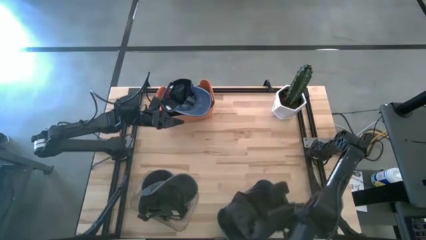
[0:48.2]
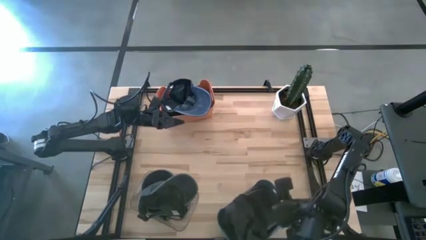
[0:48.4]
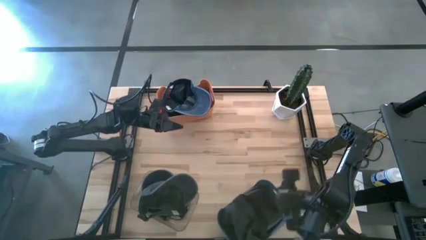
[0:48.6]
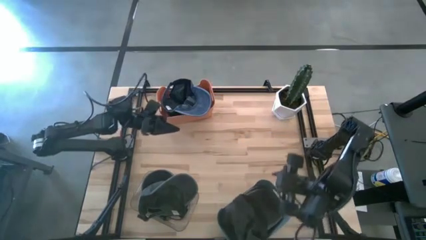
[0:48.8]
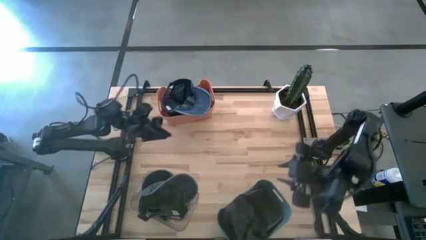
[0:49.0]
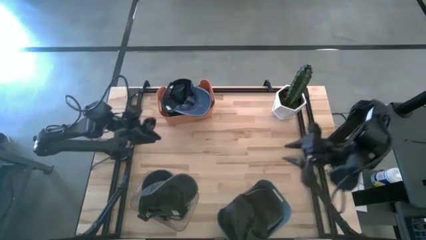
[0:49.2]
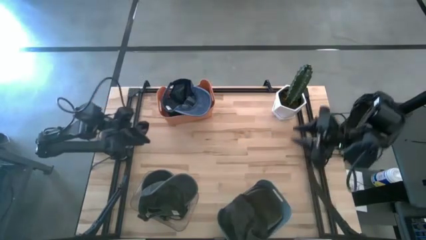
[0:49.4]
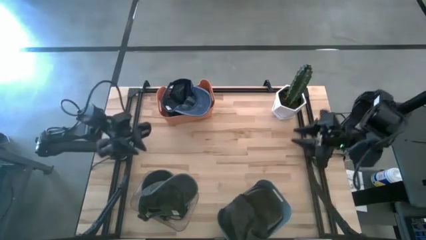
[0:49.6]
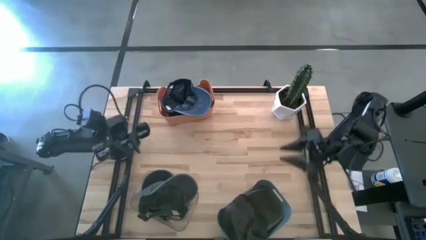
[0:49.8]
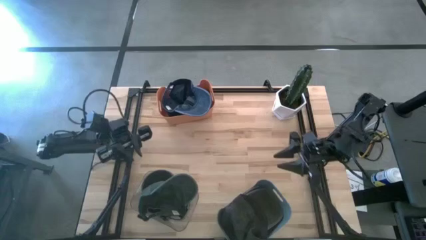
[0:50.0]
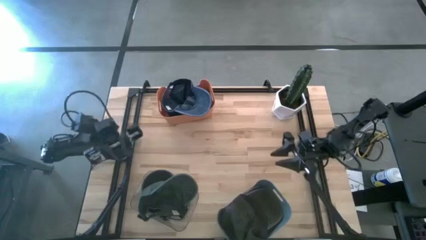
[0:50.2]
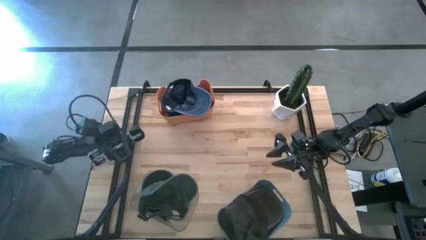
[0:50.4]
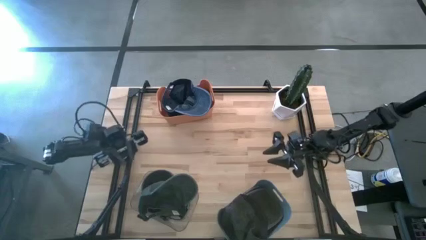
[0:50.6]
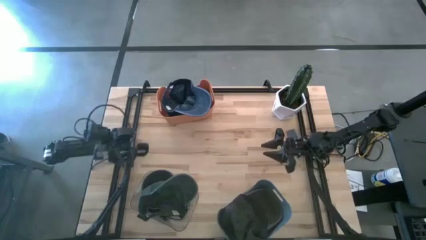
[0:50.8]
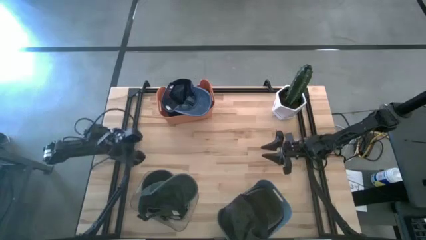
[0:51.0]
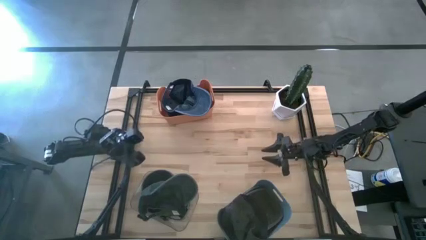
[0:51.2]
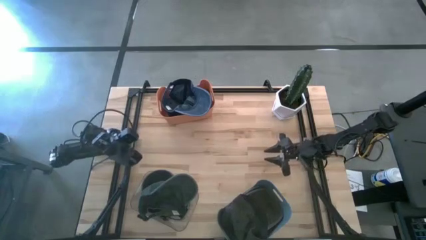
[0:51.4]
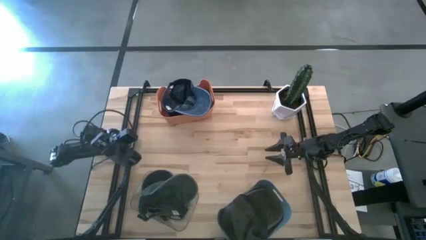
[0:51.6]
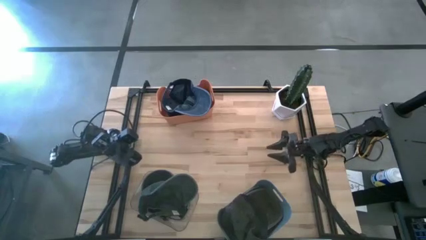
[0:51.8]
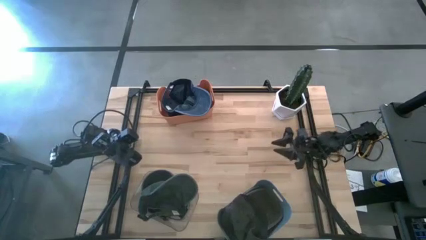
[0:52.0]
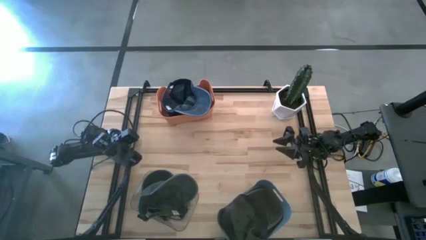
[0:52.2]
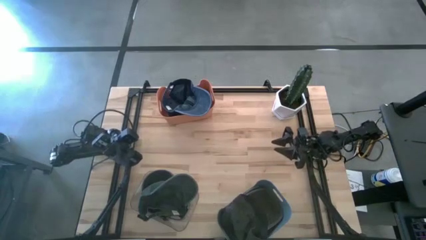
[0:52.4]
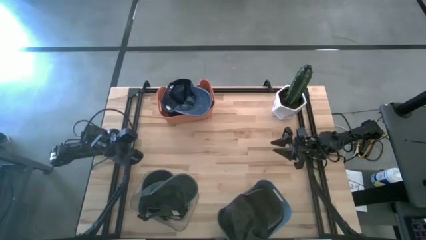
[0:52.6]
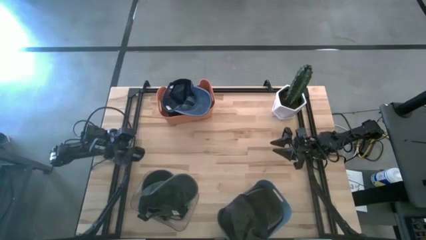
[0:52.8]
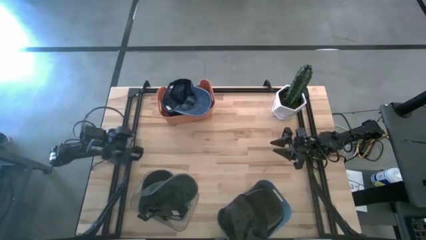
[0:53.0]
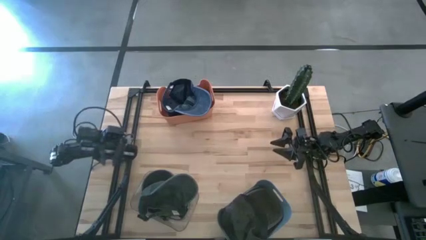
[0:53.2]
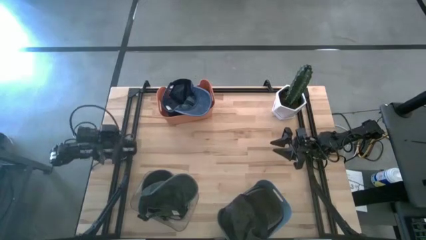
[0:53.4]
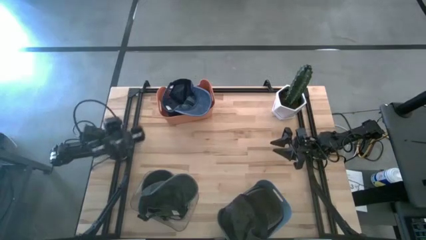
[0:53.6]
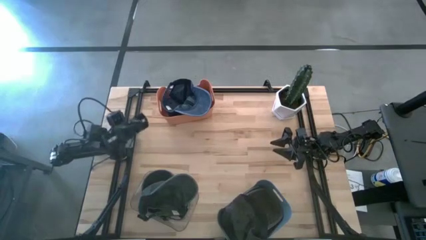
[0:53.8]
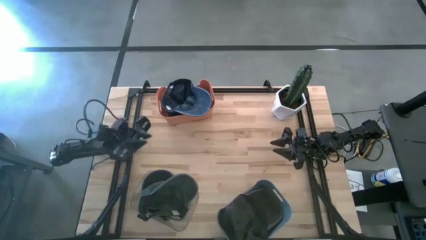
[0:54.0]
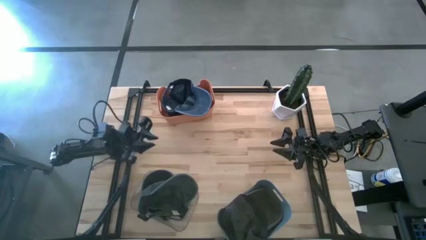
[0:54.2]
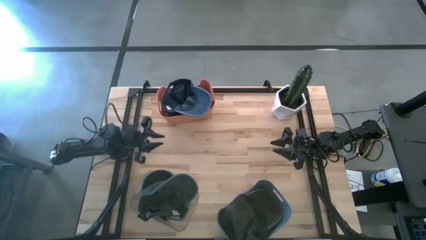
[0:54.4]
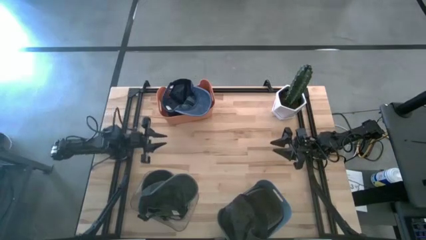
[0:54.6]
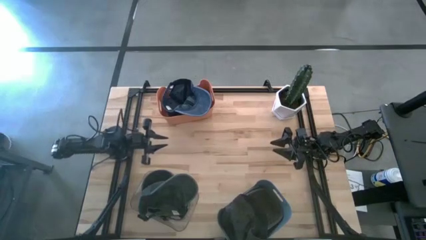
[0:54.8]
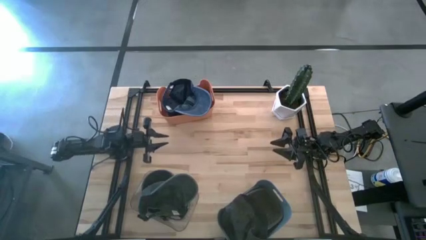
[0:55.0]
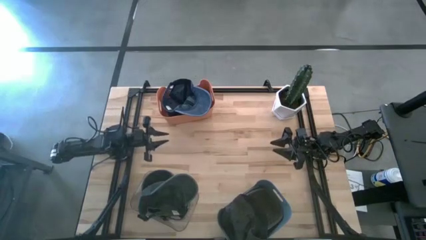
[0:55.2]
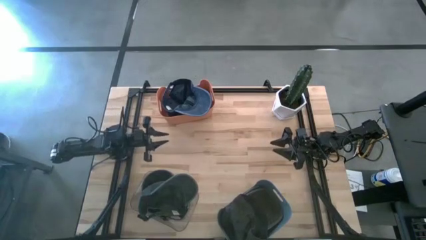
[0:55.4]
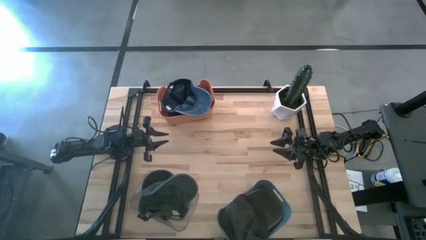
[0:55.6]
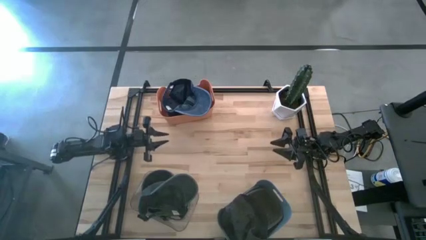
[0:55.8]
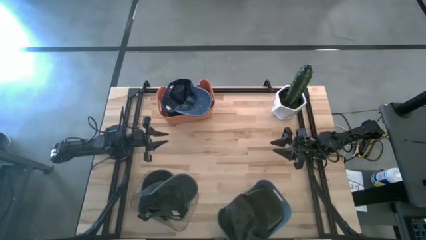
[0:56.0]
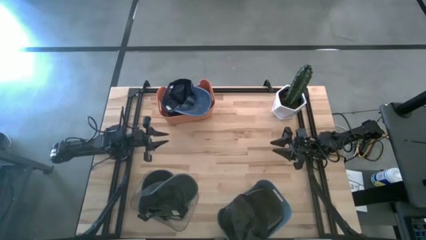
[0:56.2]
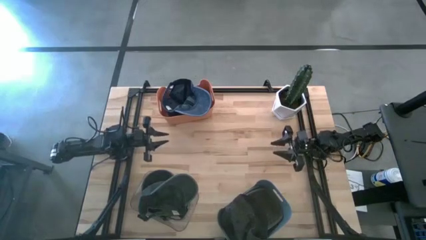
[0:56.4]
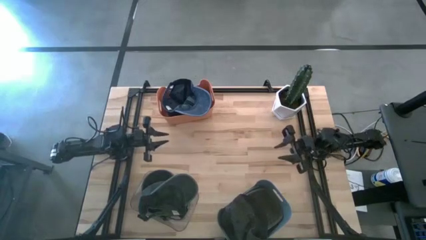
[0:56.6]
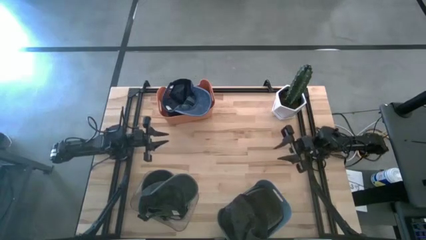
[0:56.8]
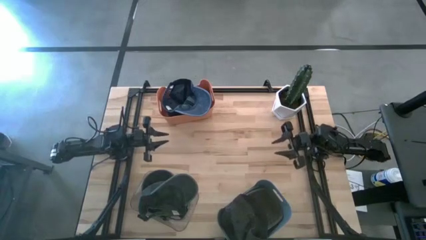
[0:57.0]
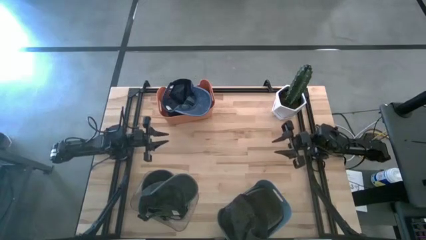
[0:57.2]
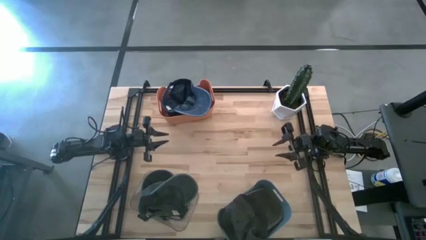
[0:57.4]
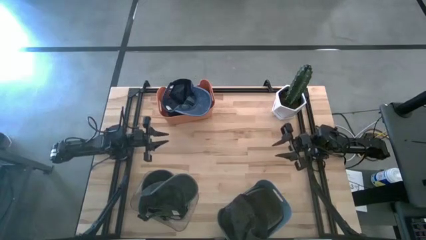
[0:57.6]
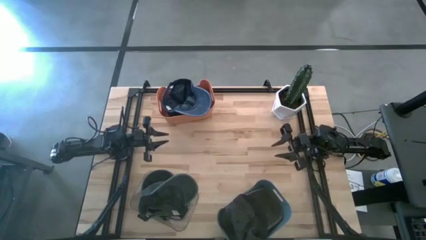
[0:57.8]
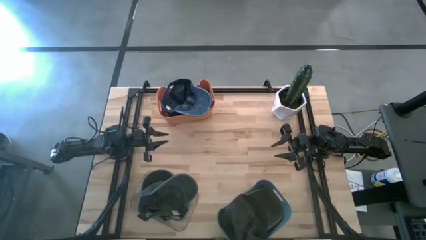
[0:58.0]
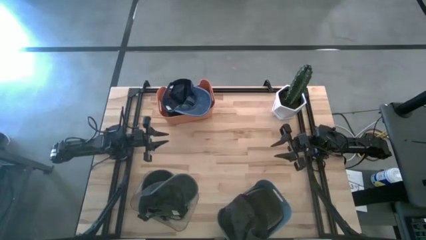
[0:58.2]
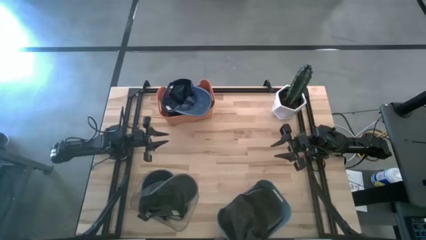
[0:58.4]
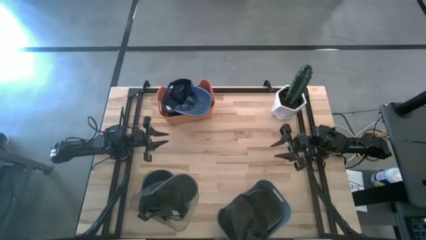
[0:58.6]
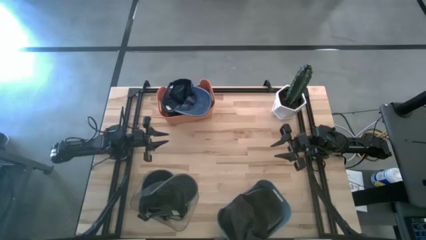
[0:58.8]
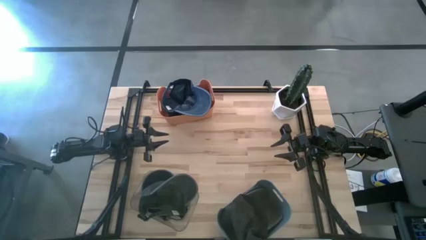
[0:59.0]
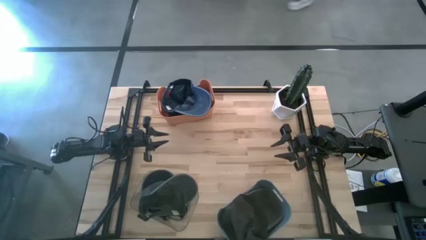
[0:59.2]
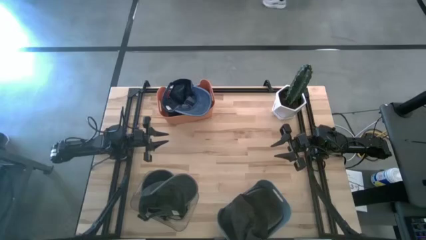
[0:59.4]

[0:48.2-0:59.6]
Task: Pick & Place hat
Return to Home Position
